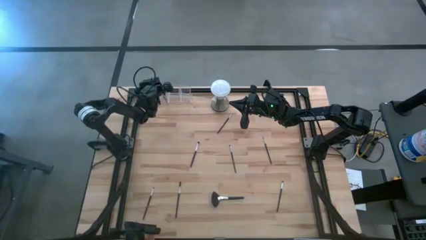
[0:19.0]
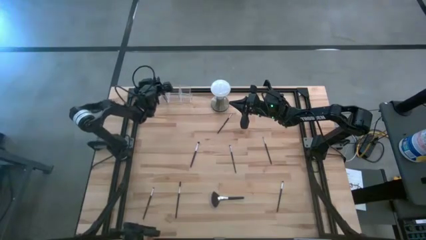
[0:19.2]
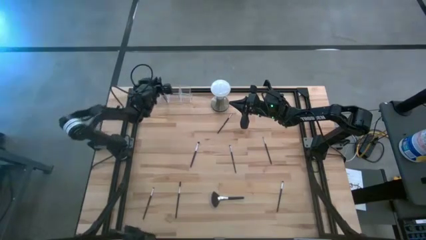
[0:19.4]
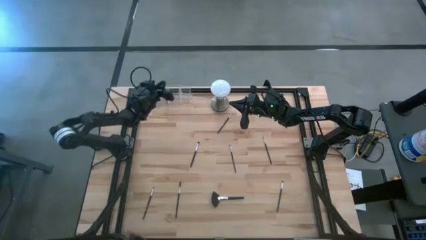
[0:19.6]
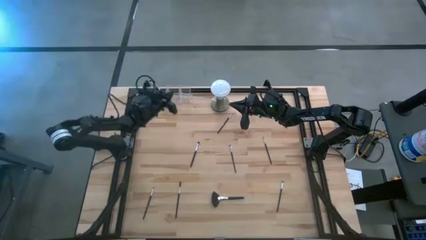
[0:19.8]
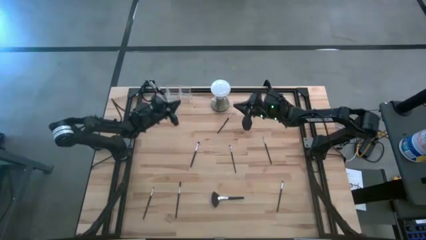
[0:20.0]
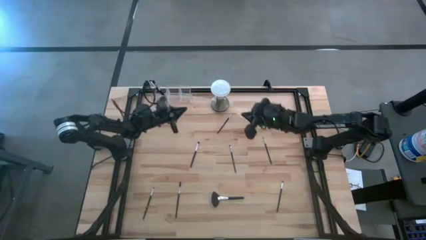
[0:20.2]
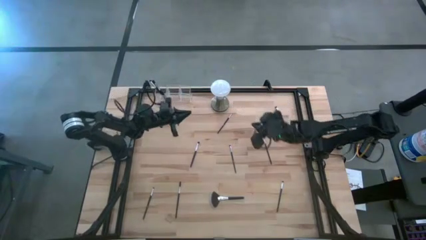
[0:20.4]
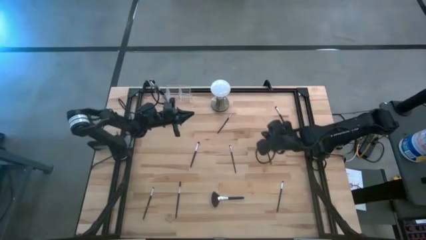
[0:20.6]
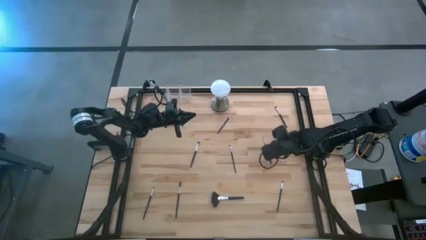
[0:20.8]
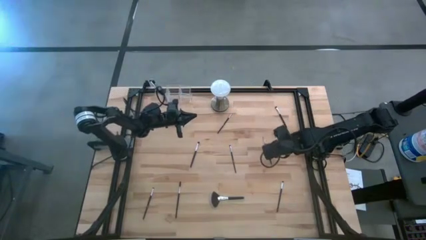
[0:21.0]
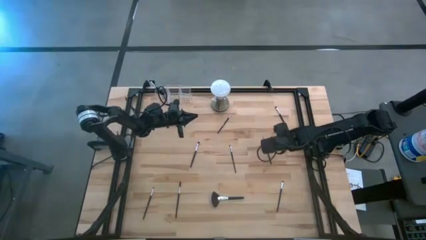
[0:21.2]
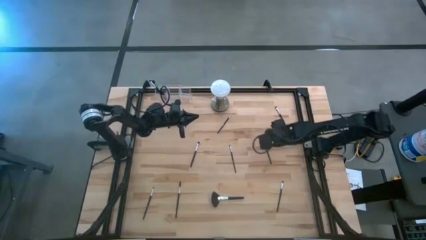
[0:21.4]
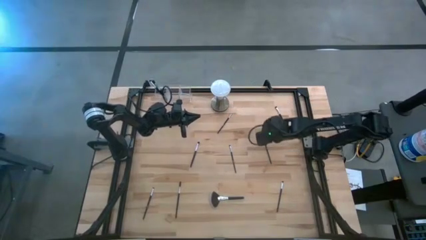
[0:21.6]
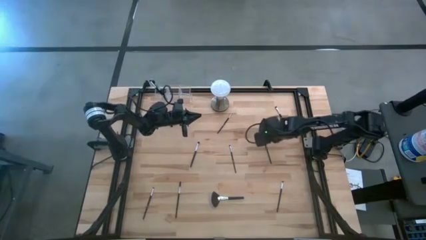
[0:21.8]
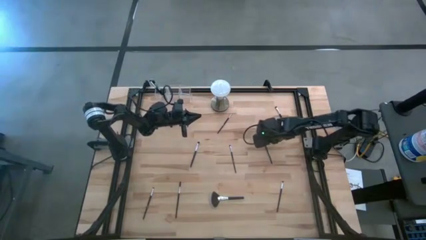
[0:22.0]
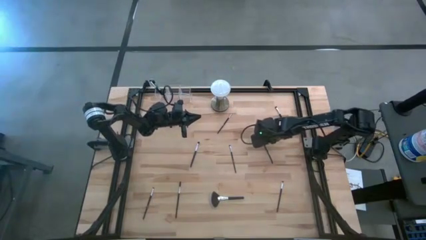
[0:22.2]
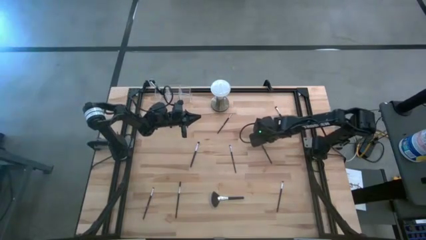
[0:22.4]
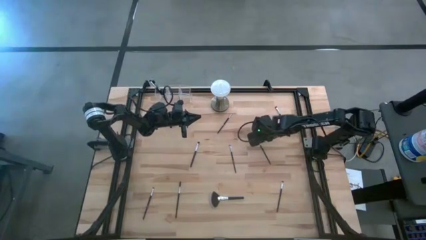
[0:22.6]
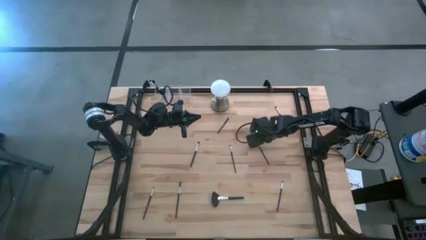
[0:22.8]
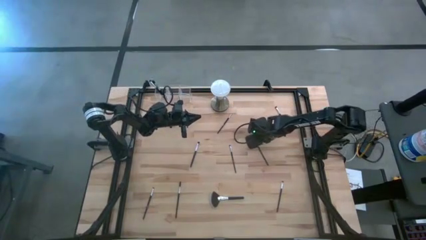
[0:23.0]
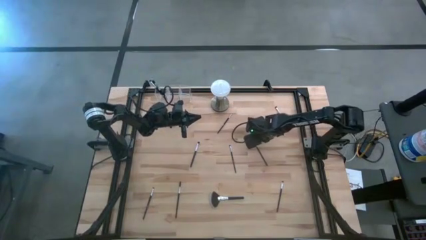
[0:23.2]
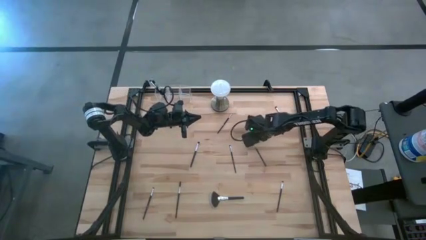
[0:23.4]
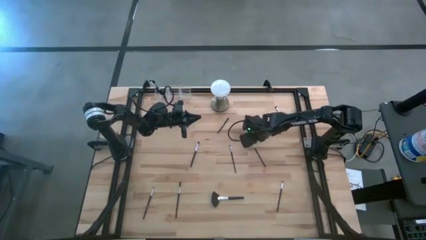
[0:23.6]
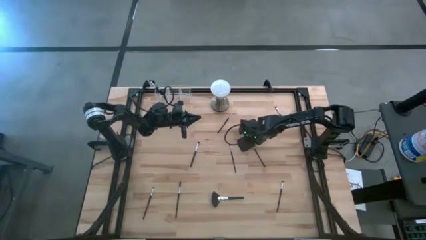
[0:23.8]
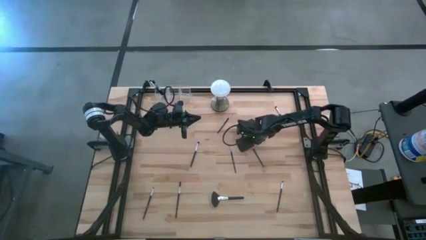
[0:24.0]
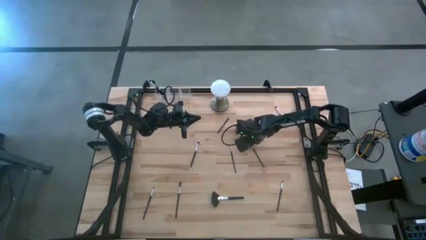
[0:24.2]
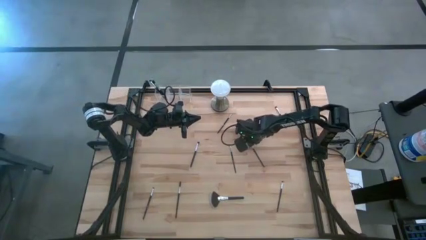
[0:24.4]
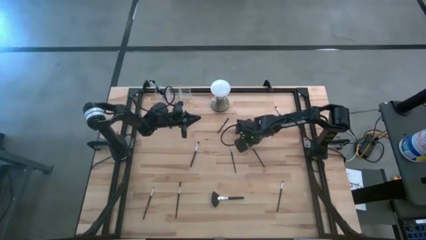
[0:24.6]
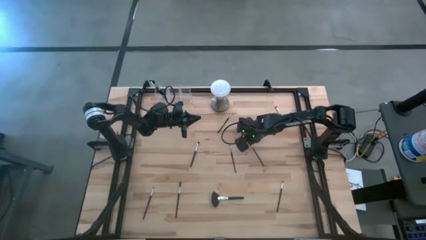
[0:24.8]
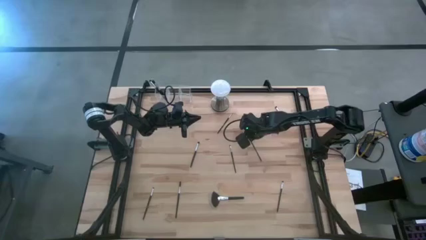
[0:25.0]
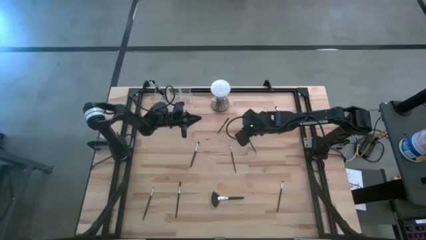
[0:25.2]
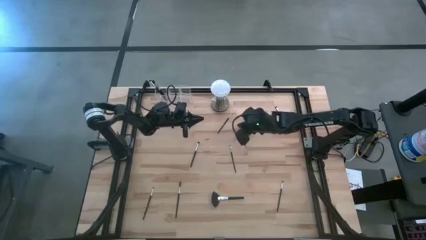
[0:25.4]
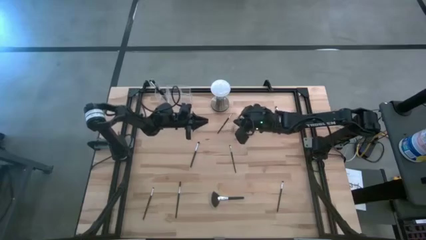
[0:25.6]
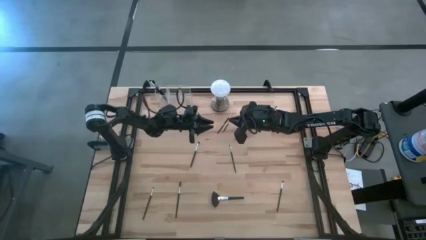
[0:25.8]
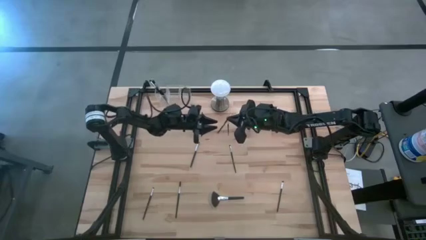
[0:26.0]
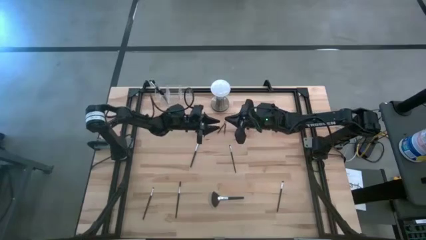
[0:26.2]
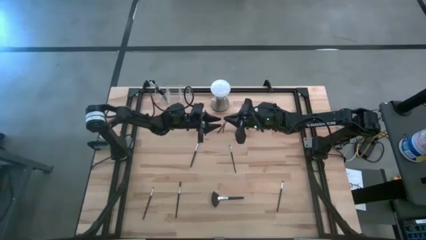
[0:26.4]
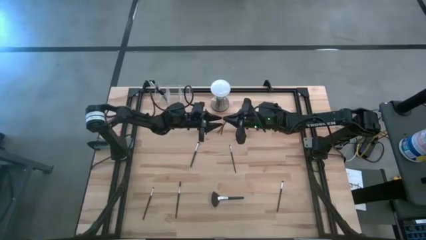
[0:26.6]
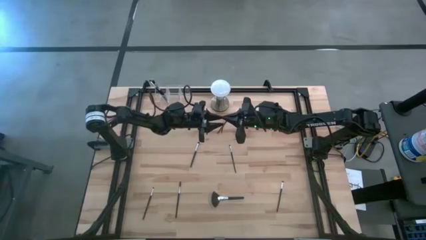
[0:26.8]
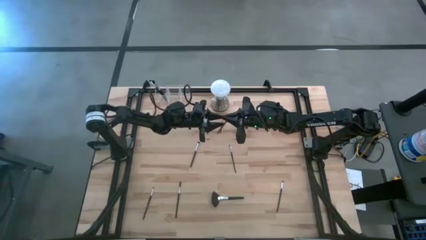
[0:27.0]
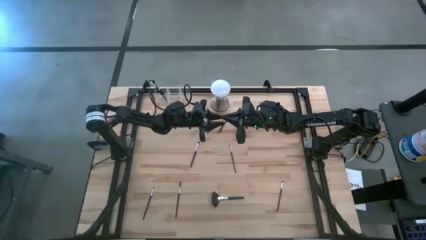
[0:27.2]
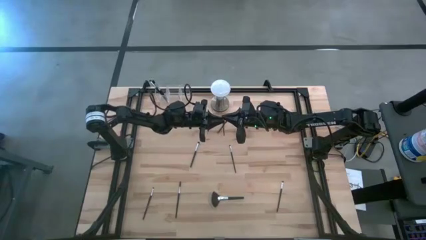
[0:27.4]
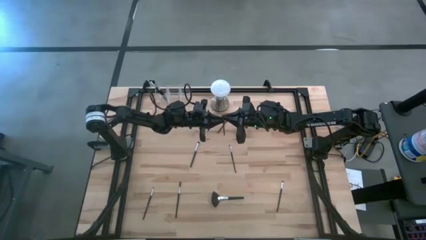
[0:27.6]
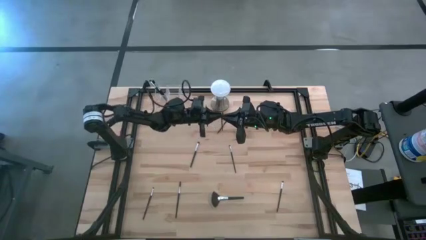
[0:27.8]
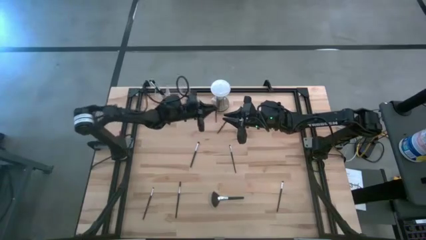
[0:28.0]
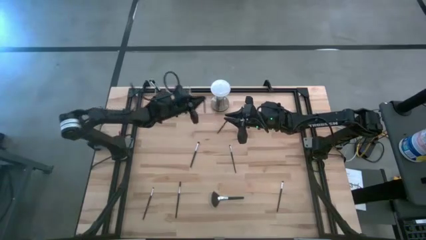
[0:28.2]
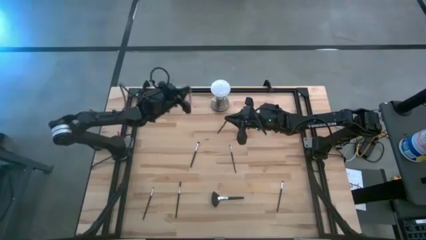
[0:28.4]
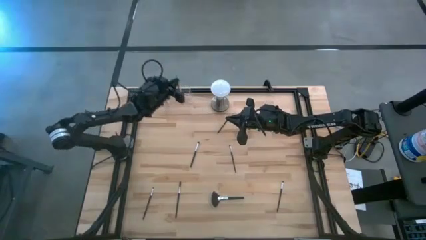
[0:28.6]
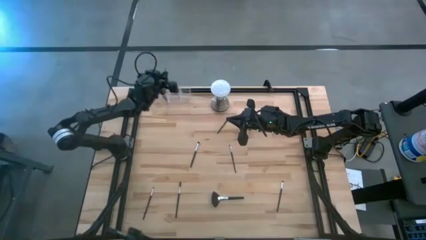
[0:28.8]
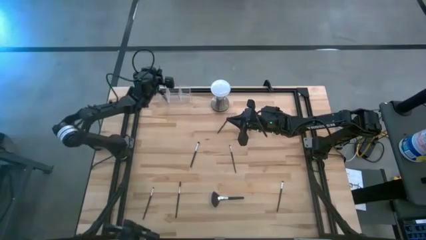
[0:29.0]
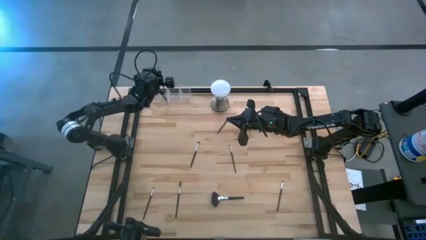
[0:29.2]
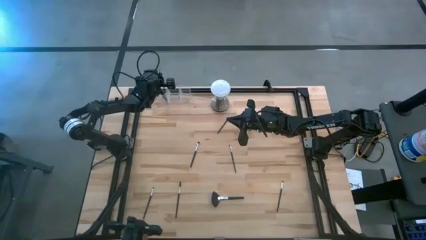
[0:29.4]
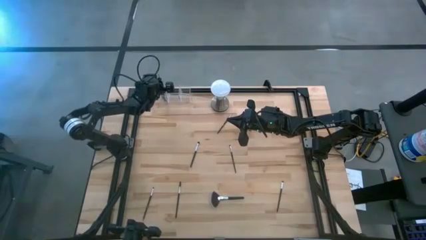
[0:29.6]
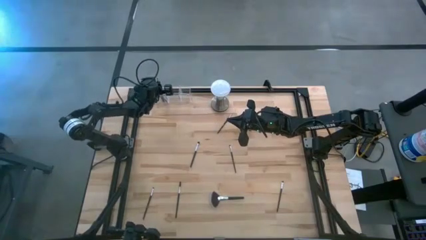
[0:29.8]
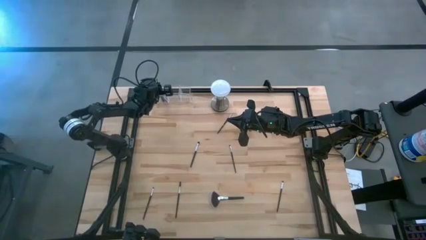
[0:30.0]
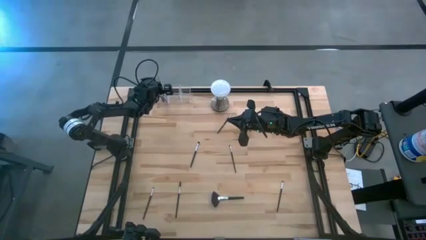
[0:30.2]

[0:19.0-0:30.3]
Task: Put items in baskets/containers
Put the eyeshadow brush into the left section of the transparent organizer

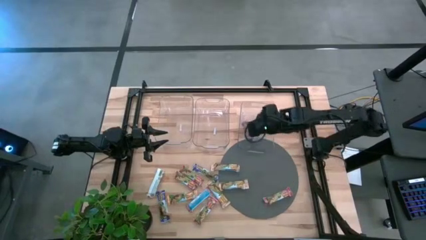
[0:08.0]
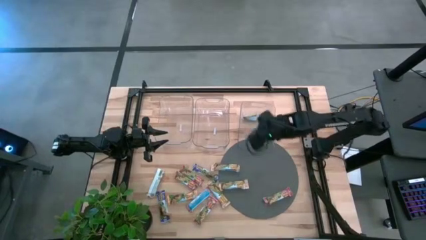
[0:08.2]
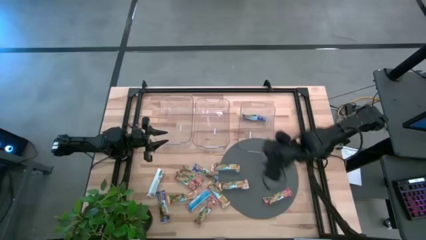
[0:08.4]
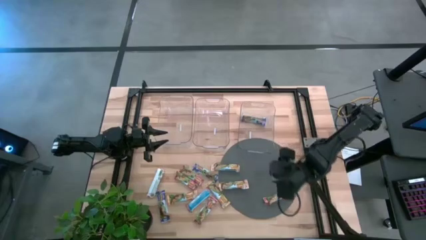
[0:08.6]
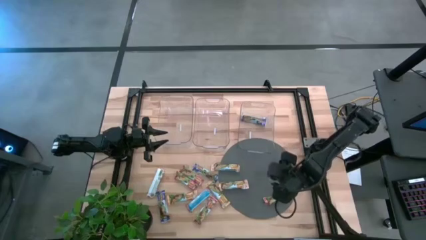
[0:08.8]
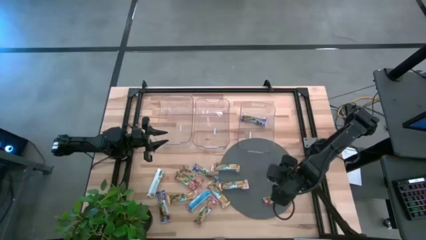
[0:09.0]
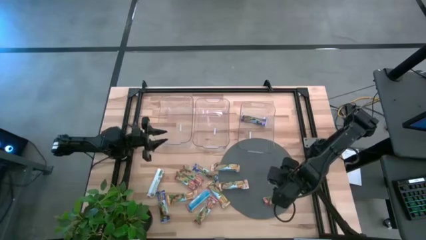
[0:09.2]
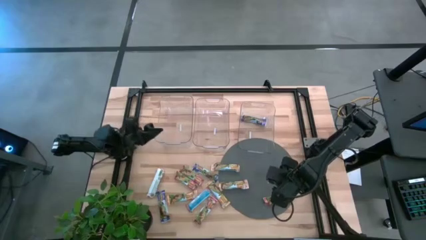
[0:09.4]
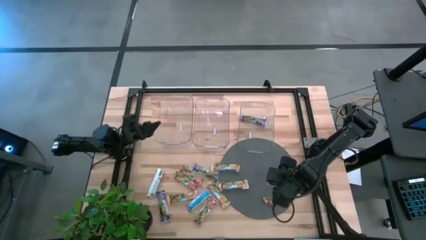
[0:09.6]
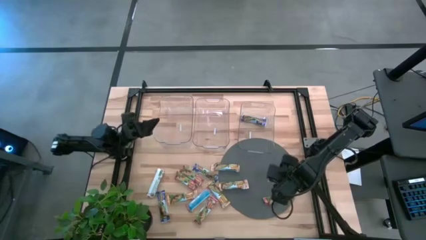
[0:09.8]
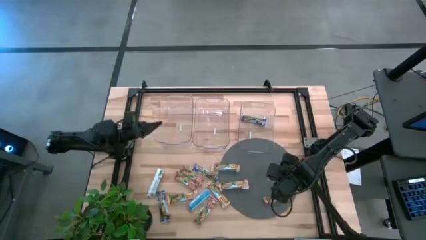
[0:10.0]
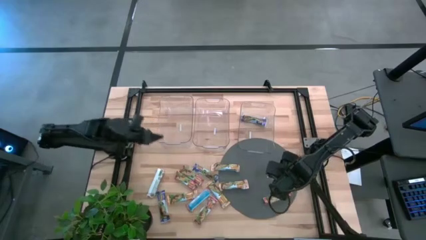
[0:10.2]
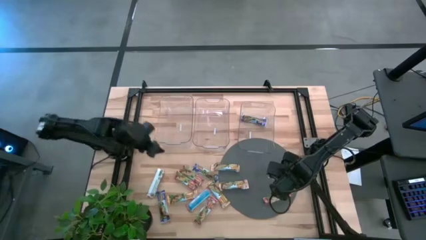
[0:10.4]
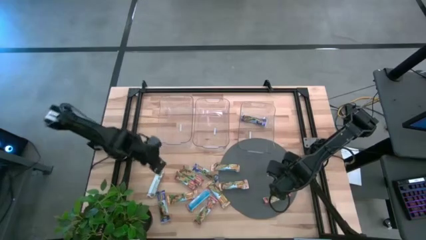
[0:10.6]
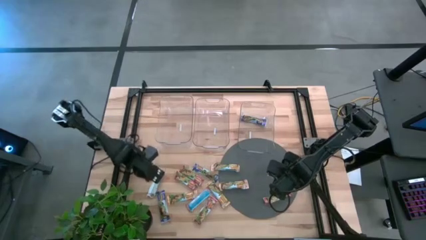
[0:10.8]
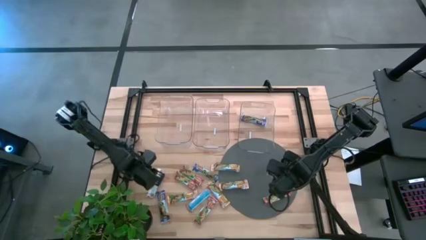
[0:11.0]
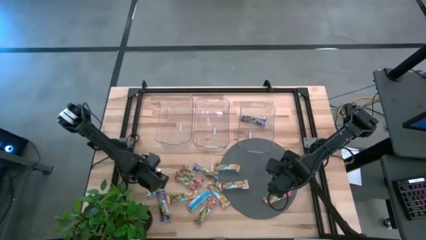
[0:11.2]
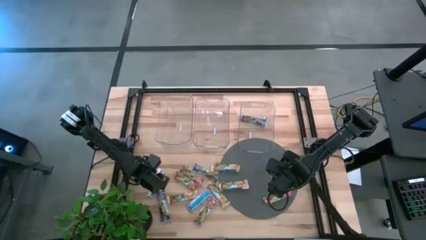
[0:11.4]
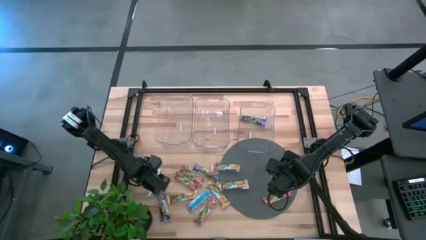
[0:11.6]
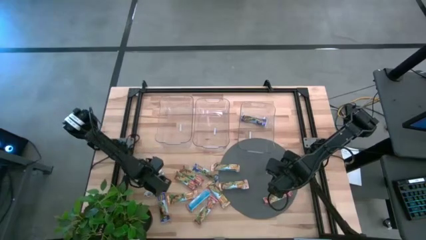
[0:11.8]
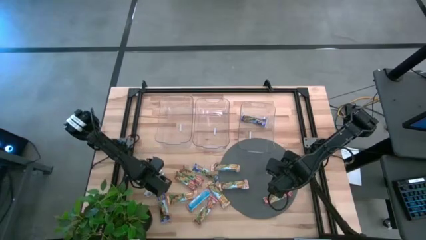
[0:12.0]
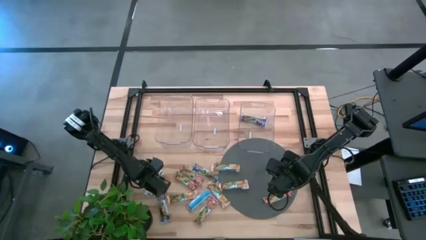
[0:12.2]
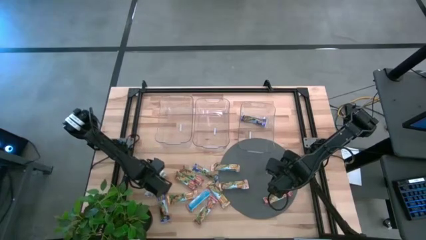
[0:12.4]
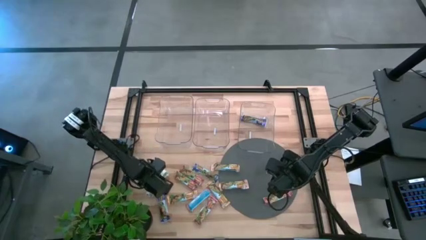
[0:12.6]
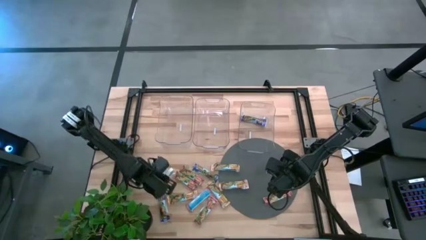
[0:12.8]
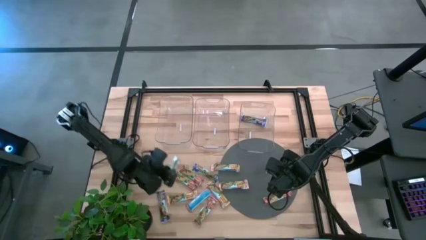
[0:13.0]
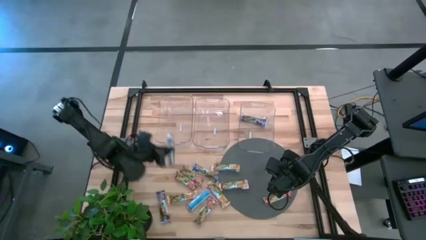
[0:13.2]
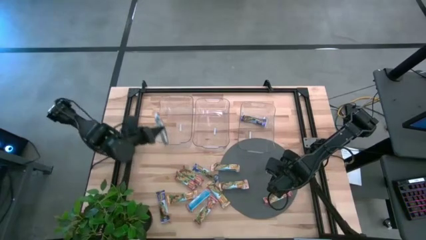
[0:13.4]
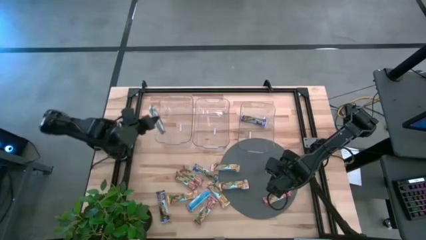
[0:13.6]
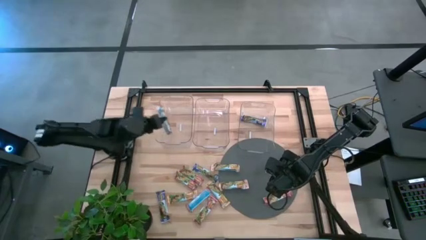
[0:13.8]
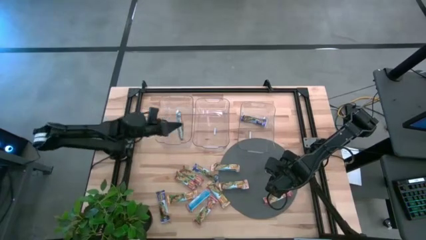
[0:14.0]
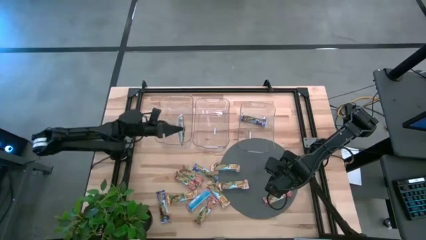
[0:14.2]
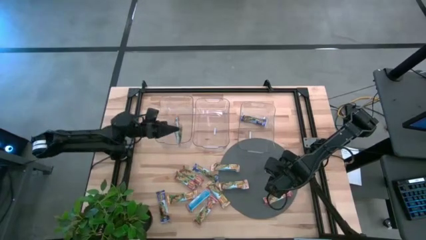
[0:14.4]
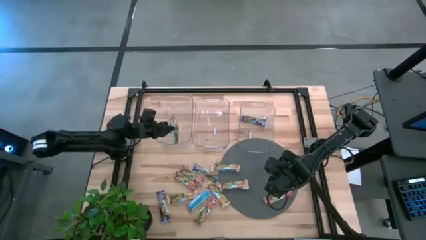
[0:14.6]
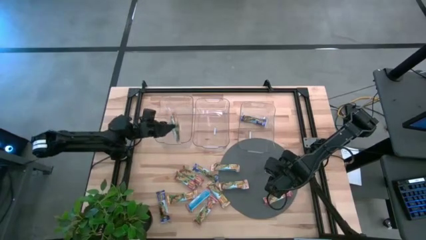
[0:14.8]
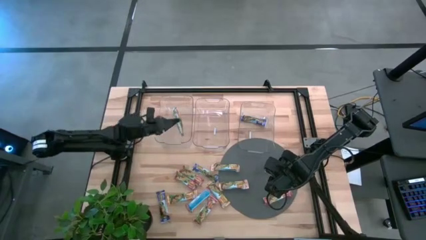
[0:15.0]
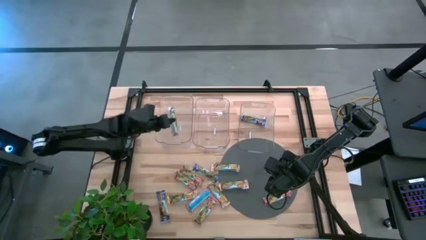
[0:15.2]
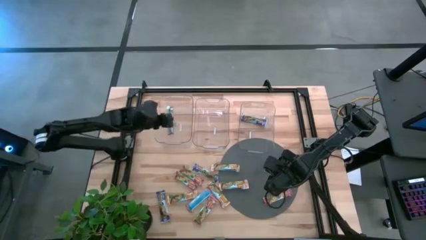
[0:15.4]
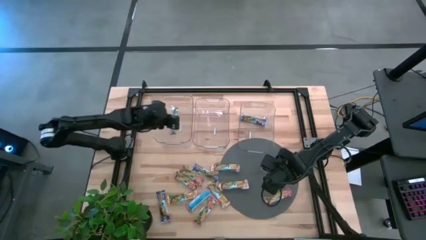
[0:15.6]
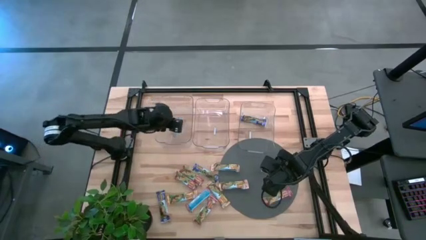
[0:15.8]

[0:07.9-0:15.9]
Task: Pick and place Granola Bars by type
Put the yellow granola bar into the left transparent bin
